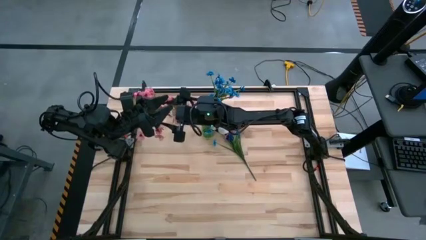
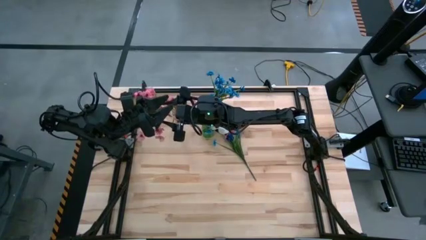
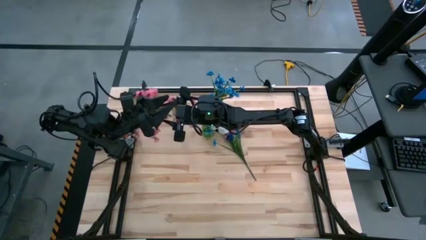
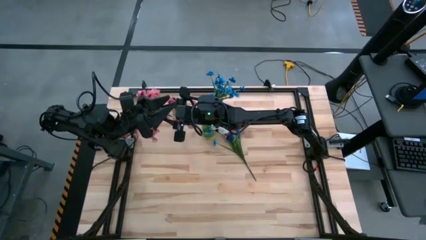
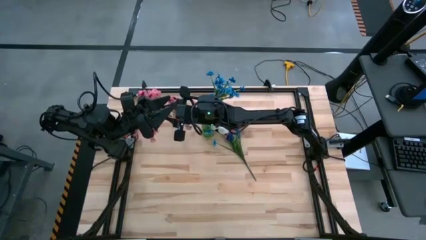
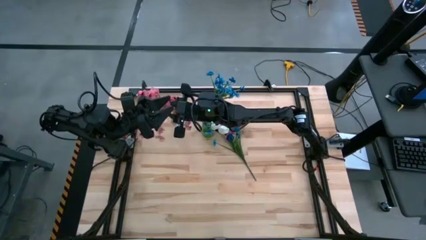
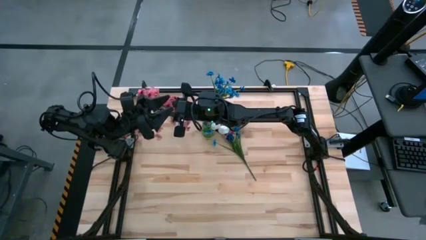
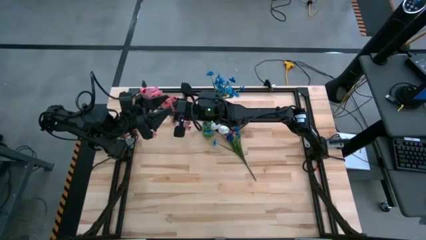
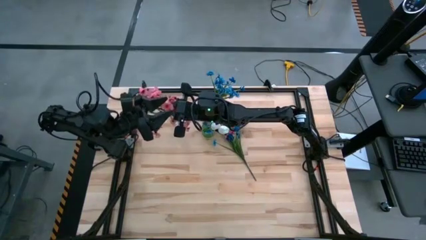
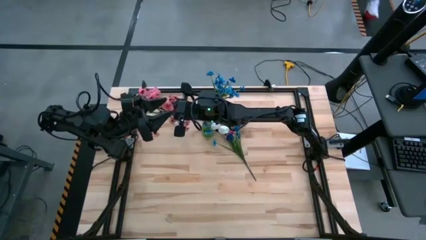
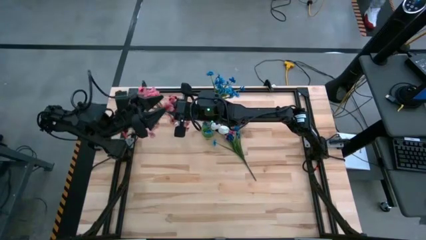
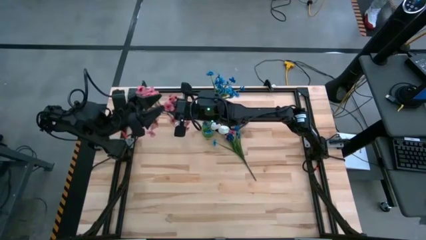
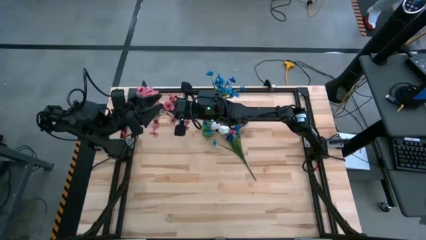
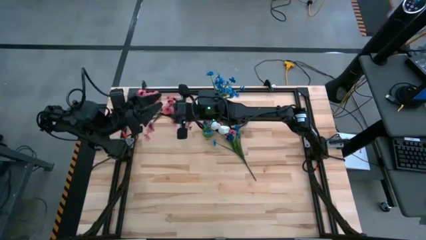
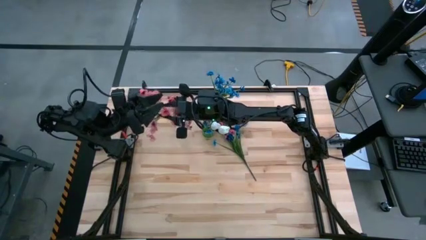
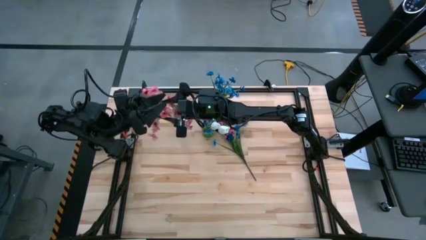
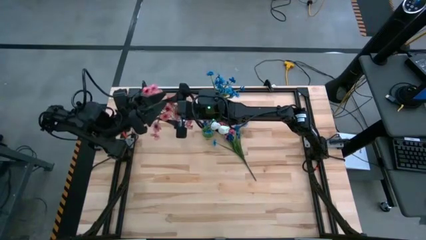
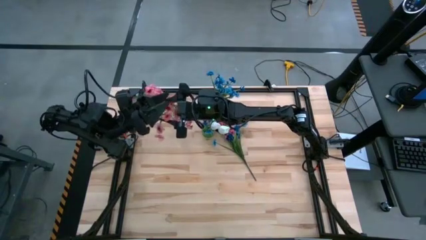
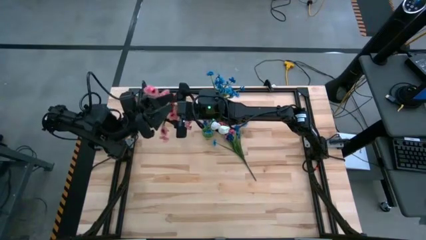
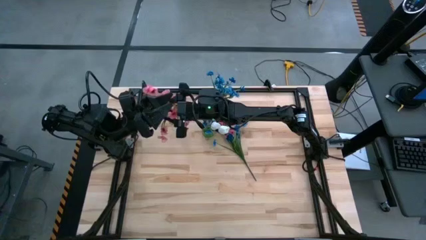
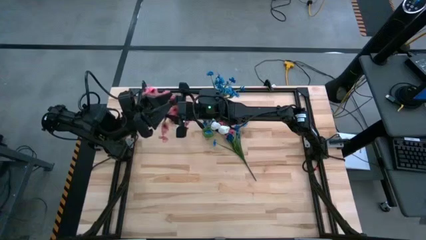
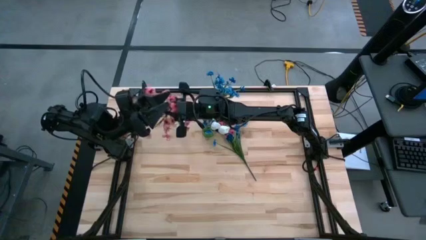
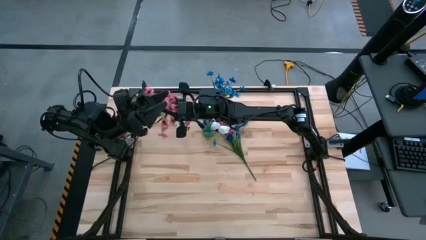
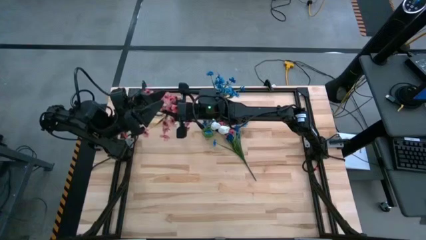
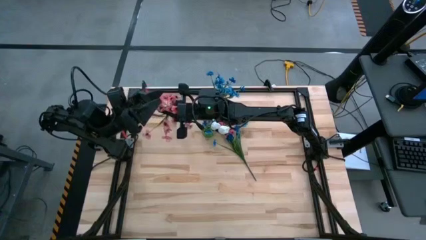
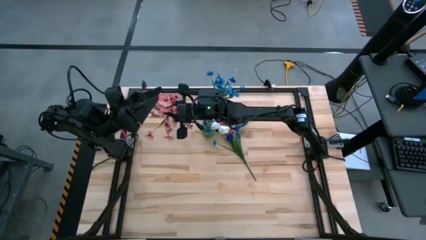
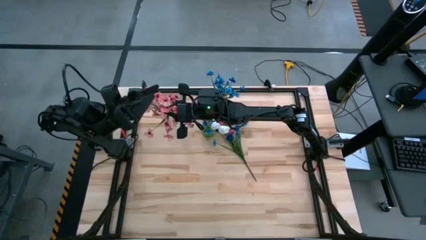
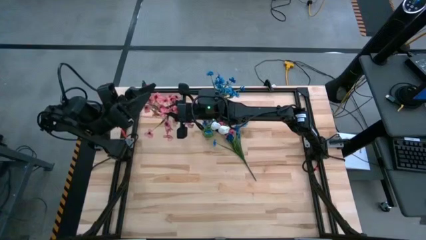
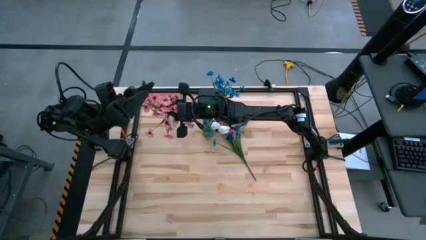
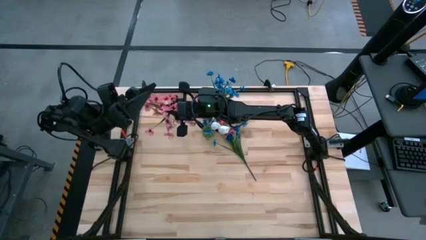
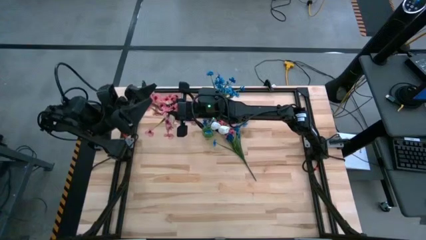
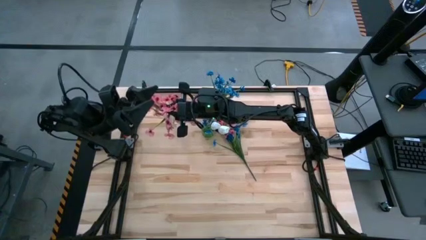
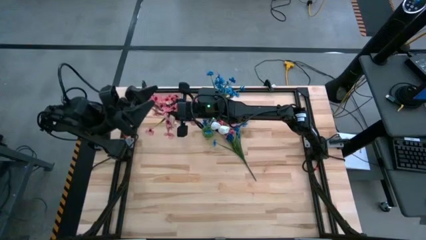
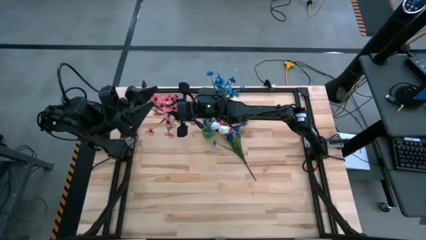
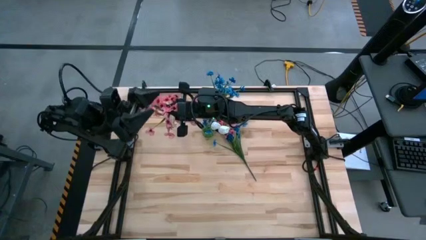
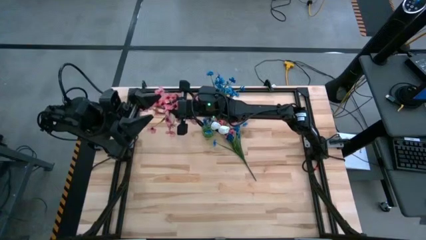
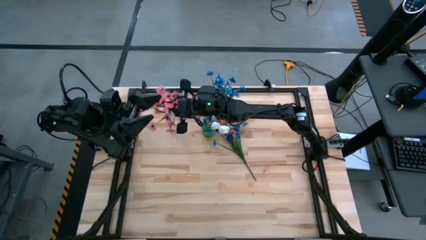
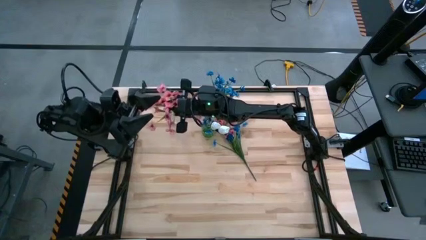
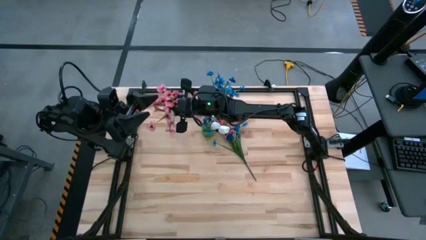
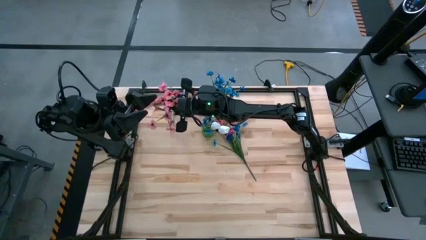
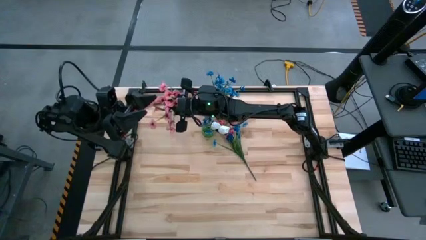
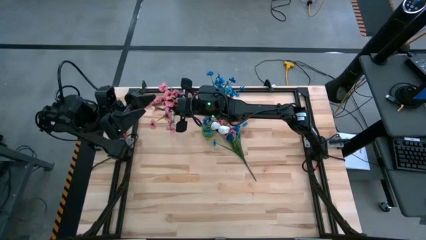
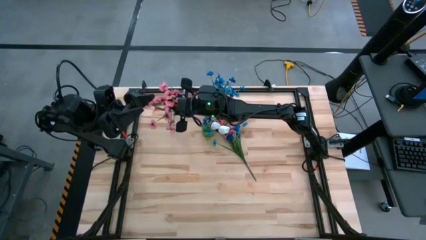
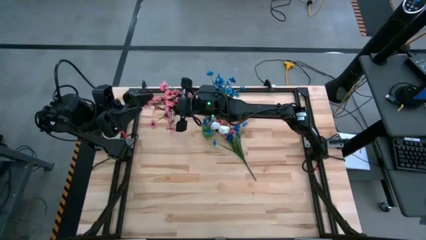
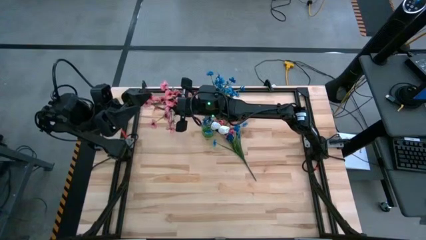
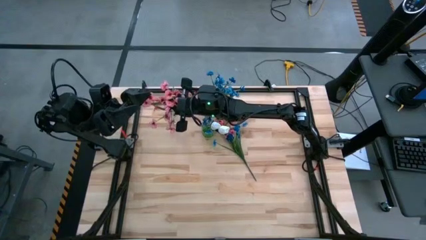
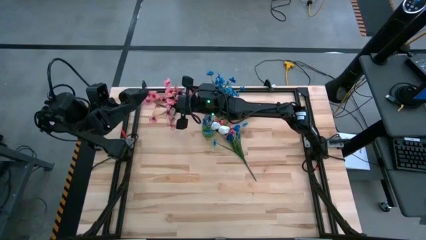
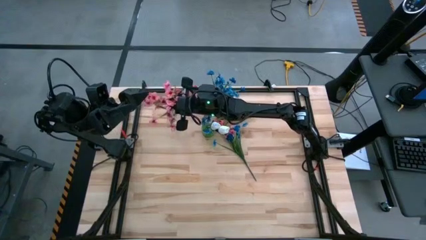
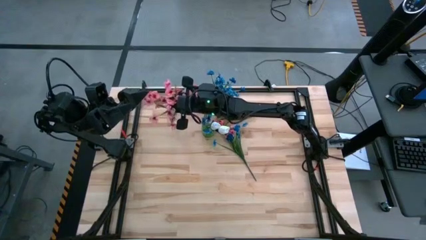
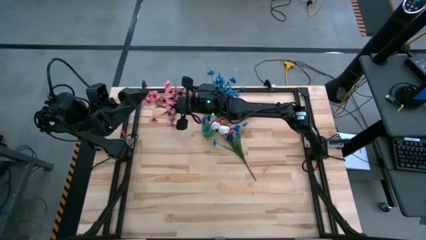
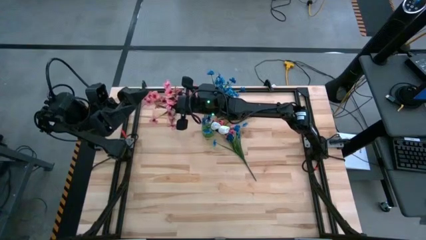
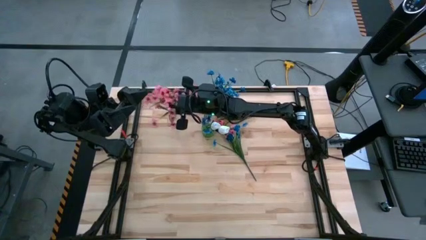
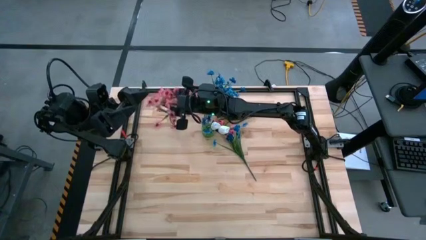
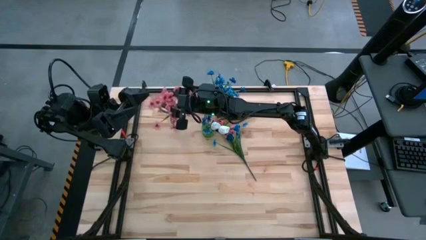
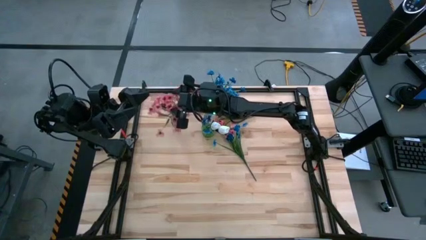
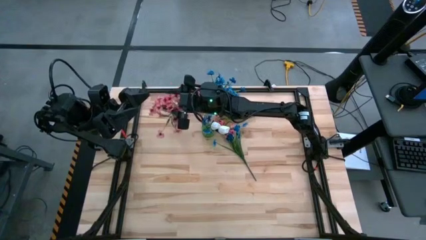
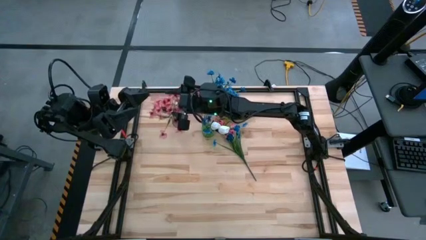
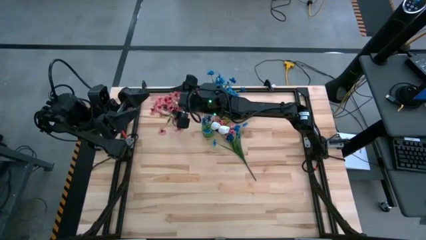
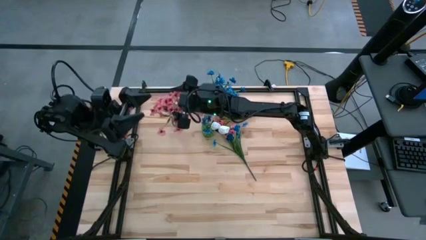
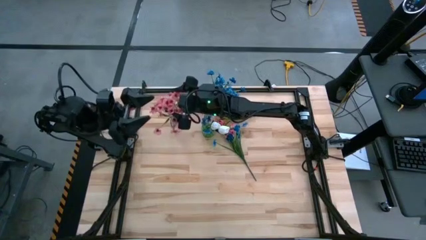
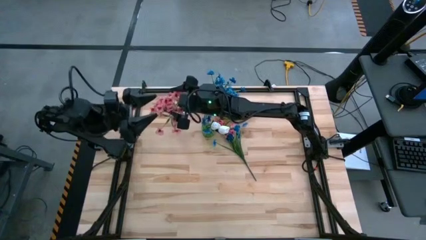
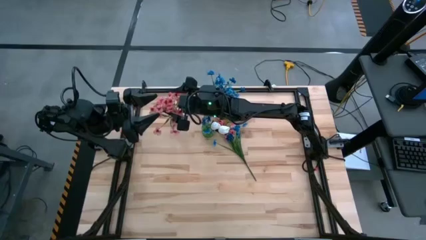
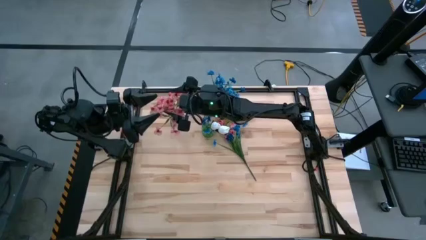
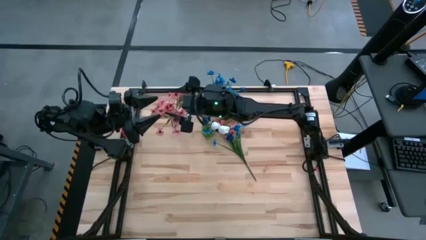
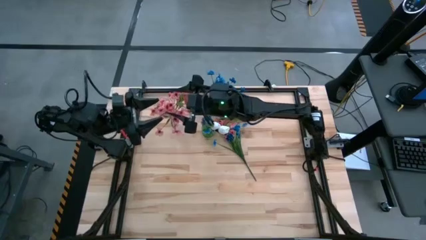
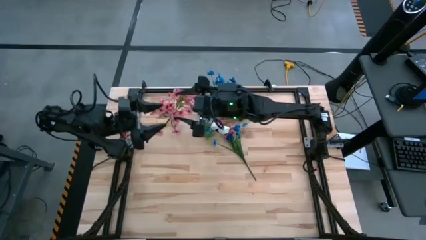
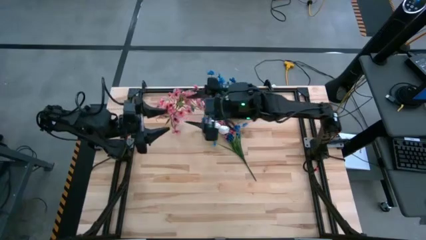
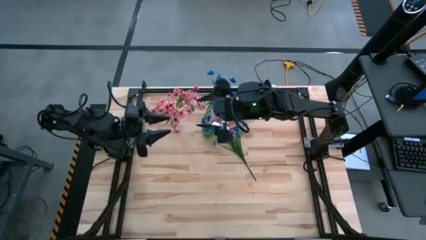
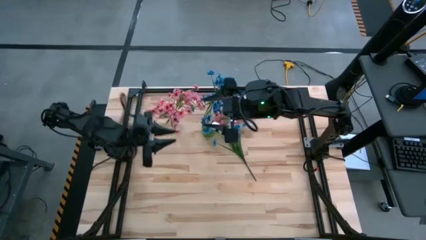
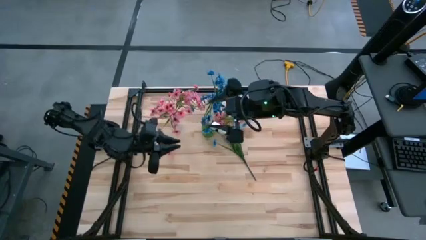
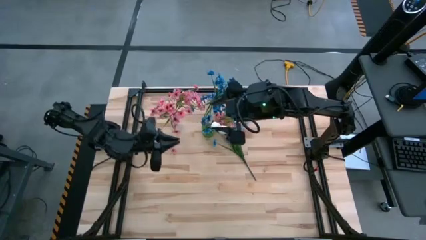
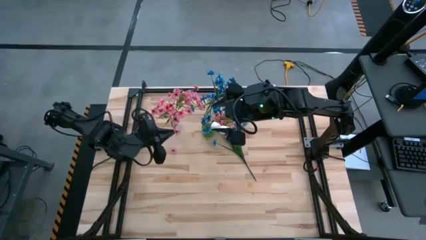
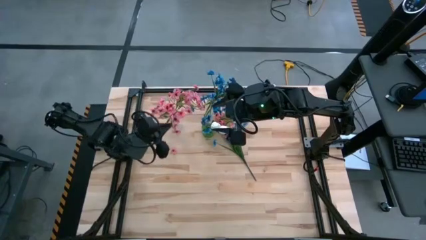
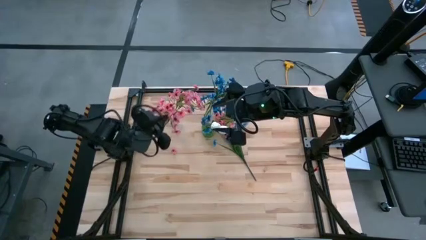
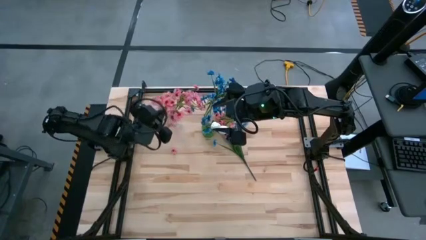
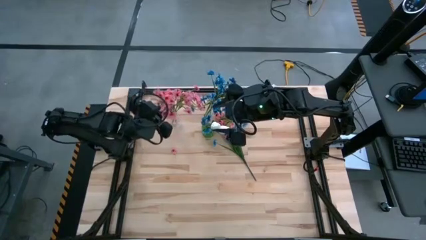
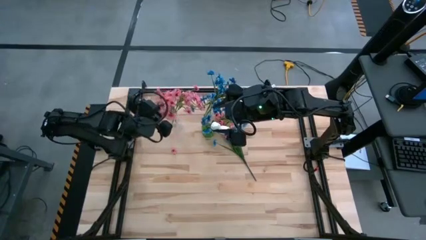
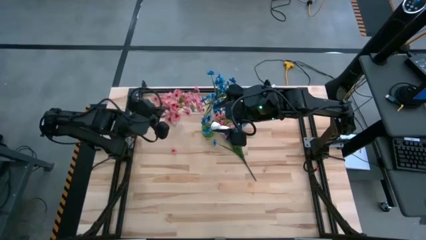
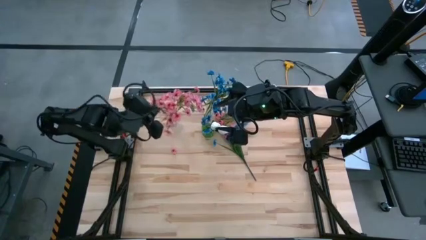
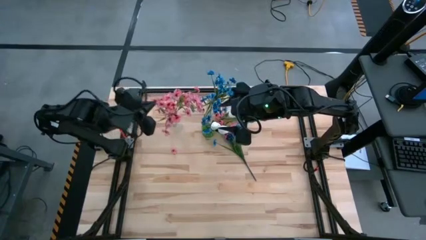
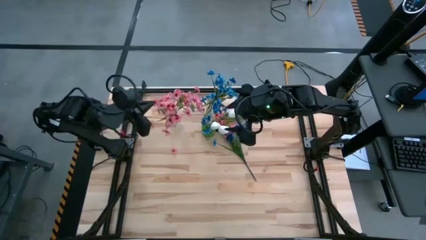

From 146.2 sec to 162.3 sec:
Task: Sort flowers into vase by color
Put the bottom pink flowers into the left transparent vase

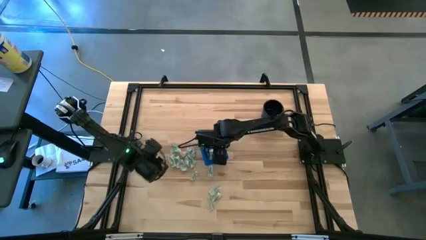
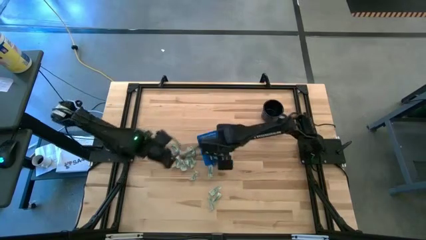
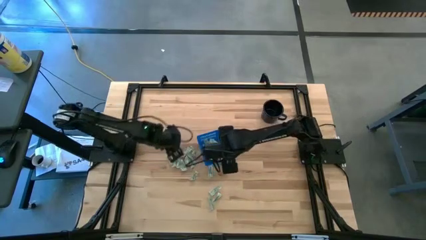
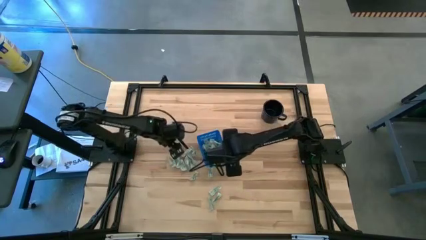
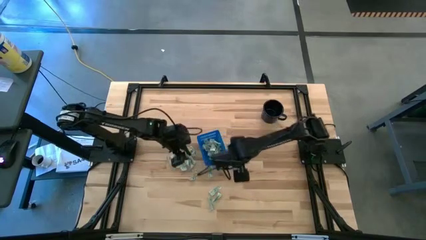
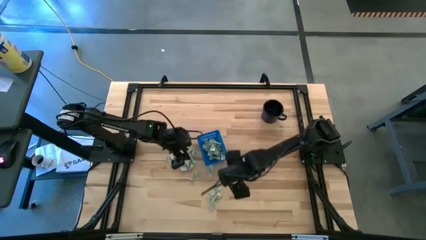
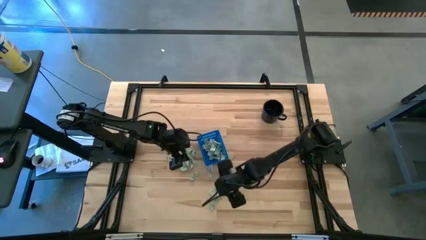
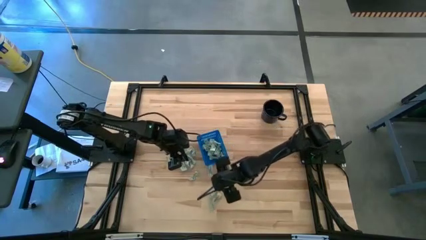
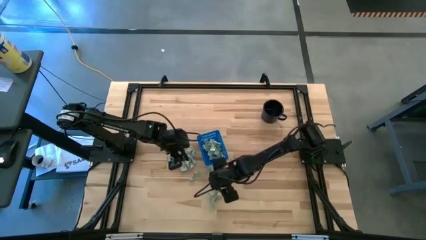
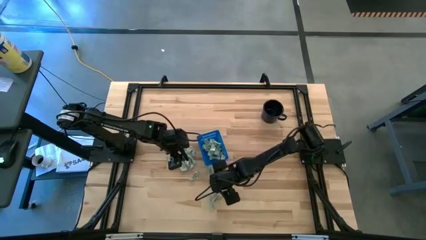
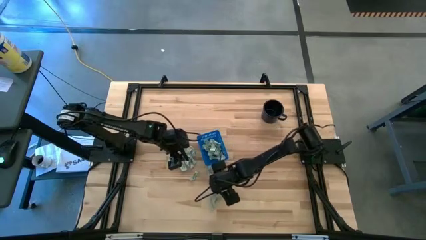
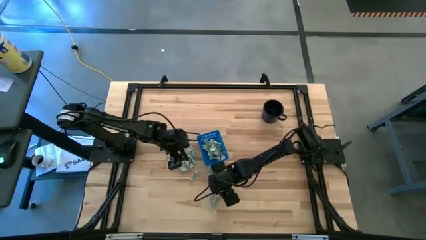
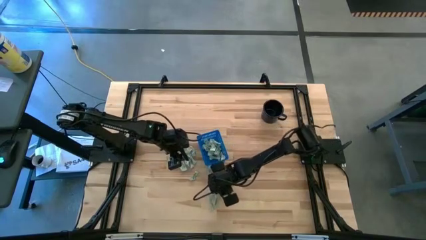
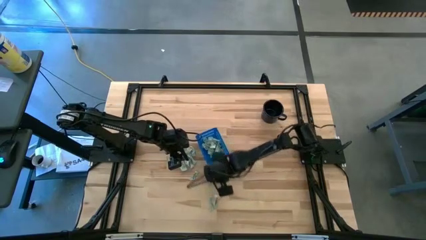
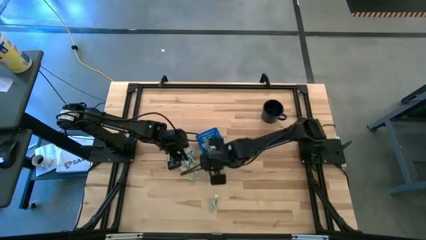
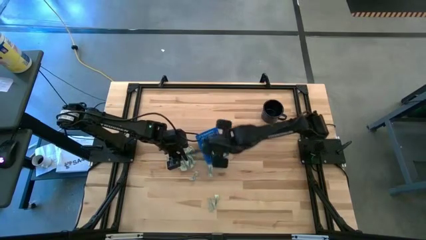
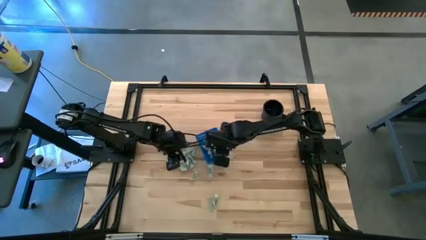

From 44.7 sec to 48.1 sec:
Task: Pick and place Stevia / Truvia into bins
Put the stevia packet into the basket
